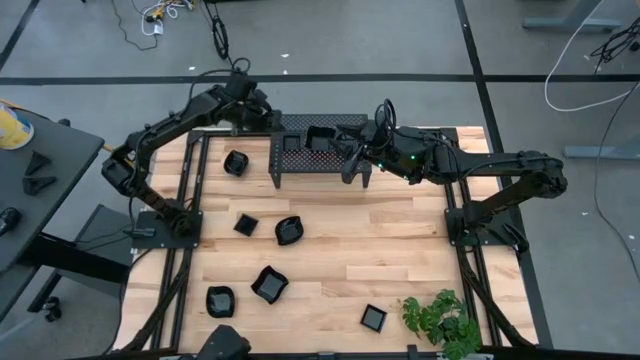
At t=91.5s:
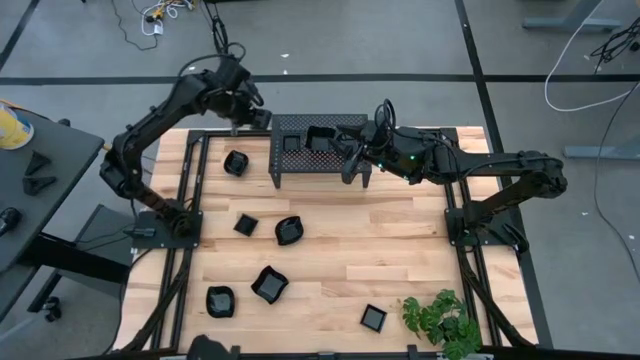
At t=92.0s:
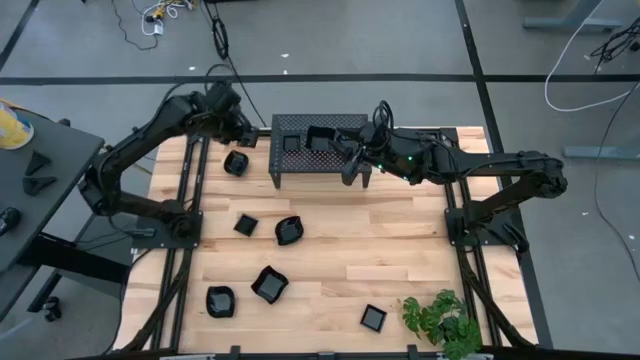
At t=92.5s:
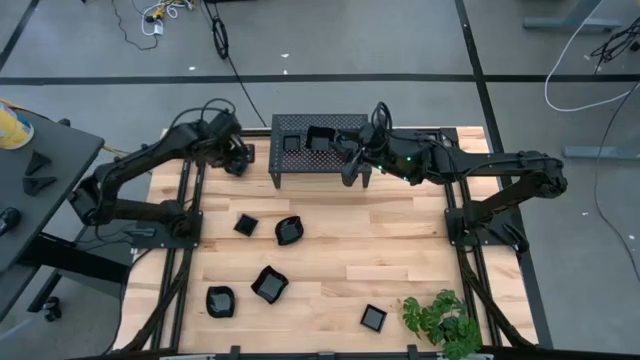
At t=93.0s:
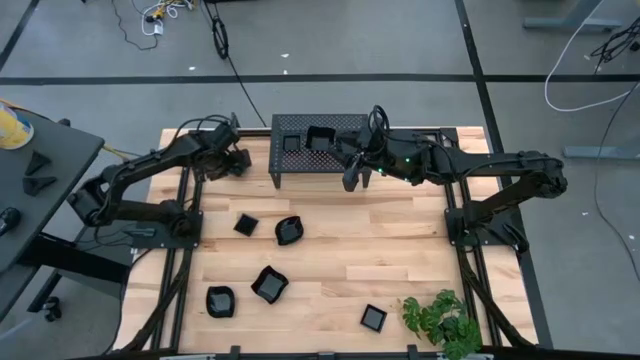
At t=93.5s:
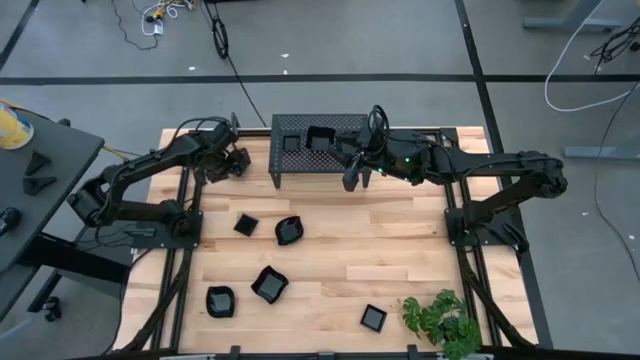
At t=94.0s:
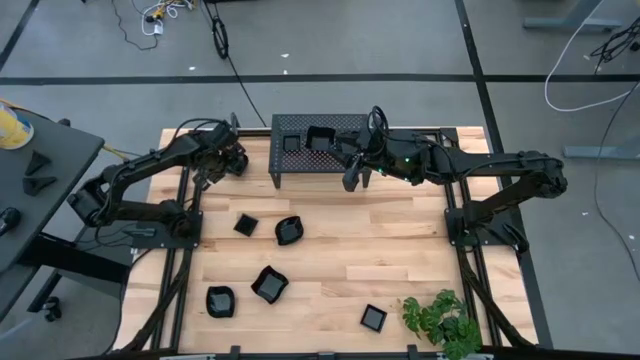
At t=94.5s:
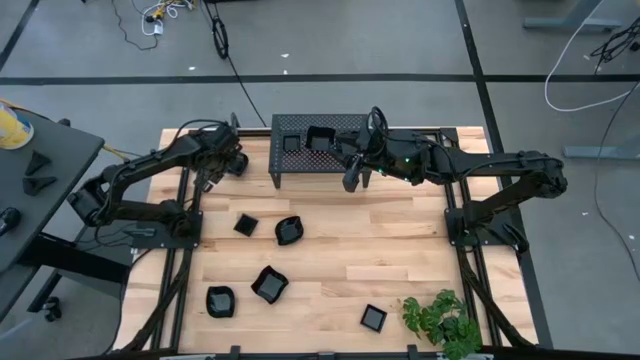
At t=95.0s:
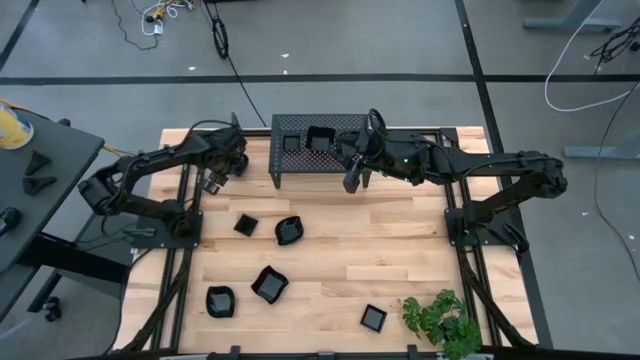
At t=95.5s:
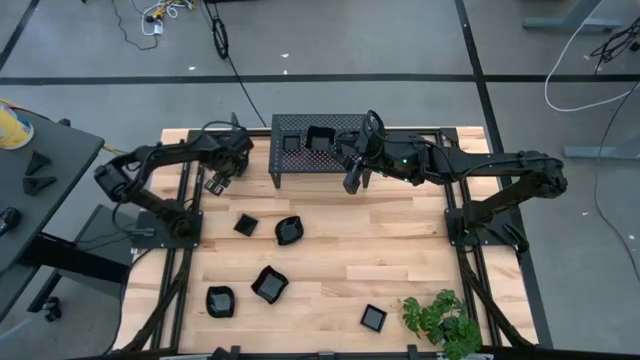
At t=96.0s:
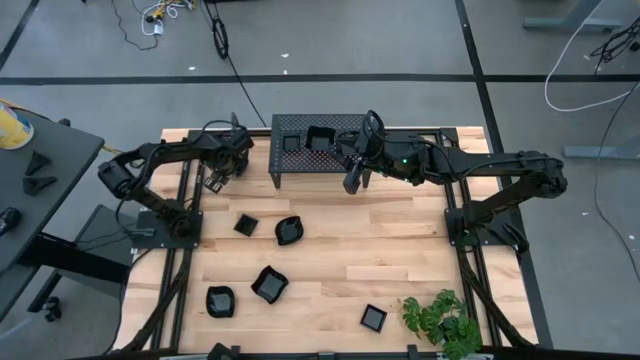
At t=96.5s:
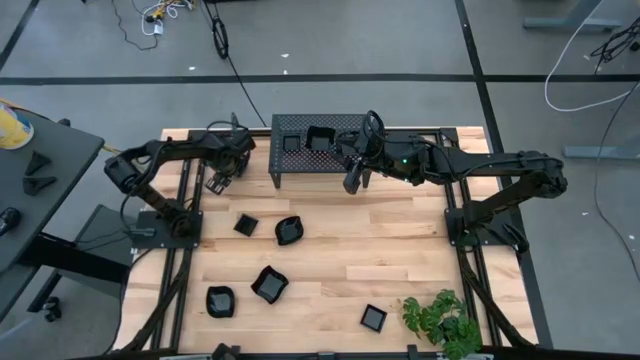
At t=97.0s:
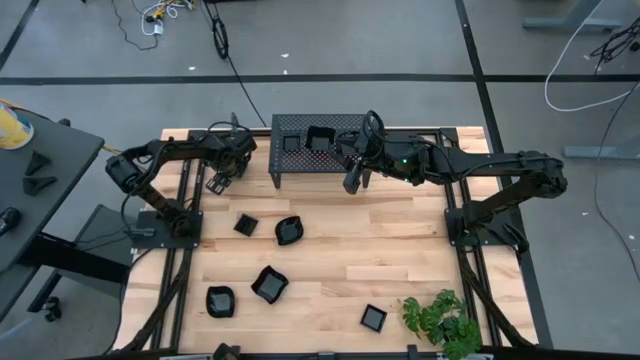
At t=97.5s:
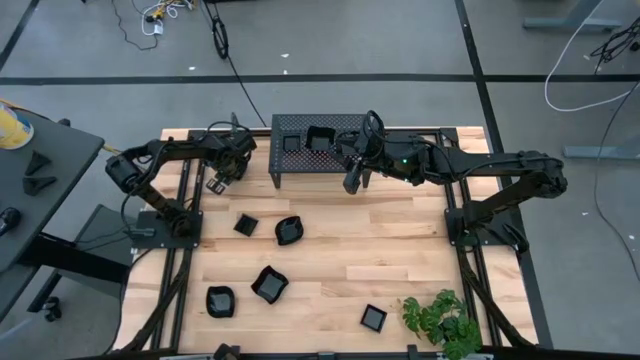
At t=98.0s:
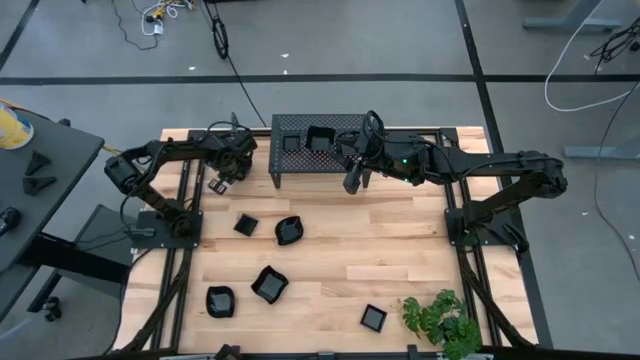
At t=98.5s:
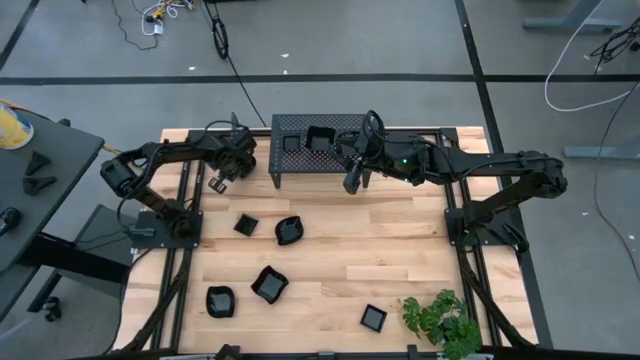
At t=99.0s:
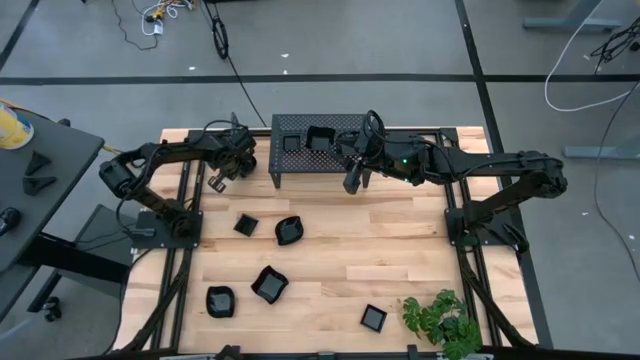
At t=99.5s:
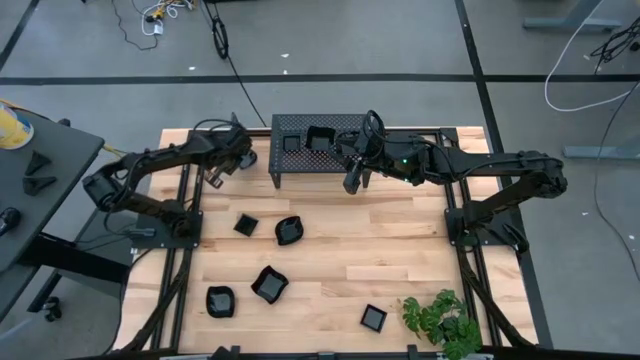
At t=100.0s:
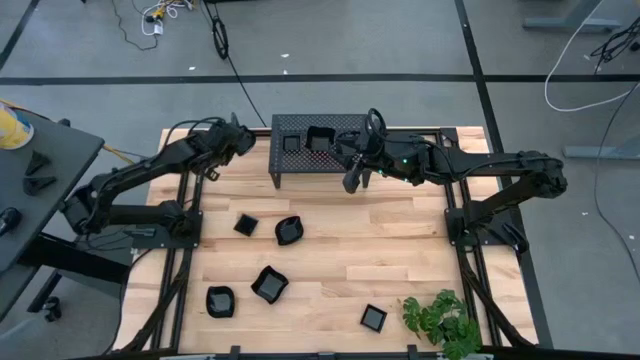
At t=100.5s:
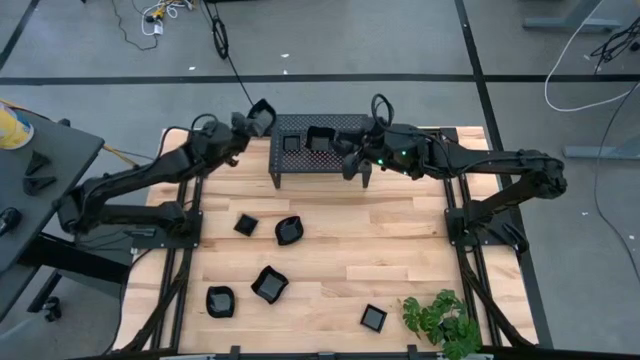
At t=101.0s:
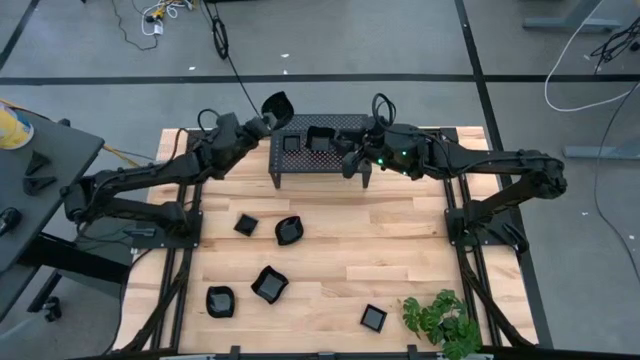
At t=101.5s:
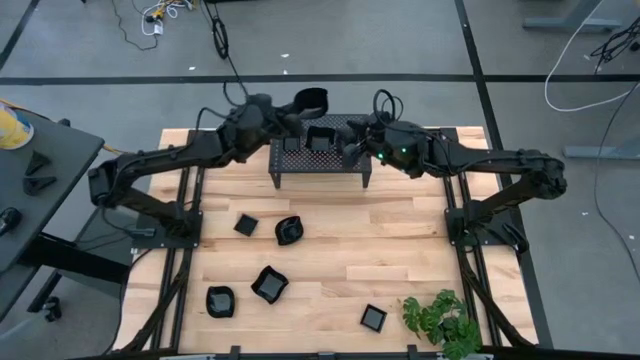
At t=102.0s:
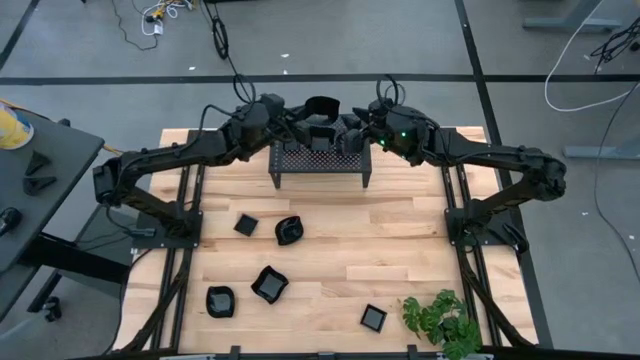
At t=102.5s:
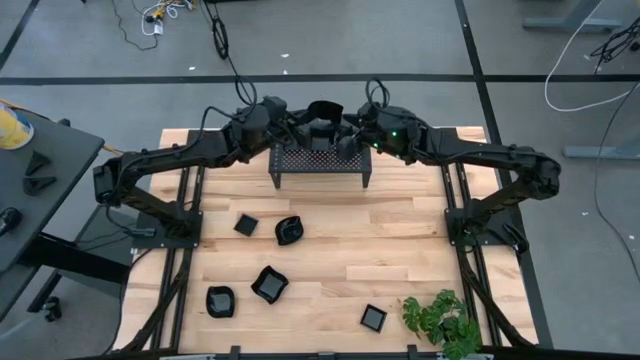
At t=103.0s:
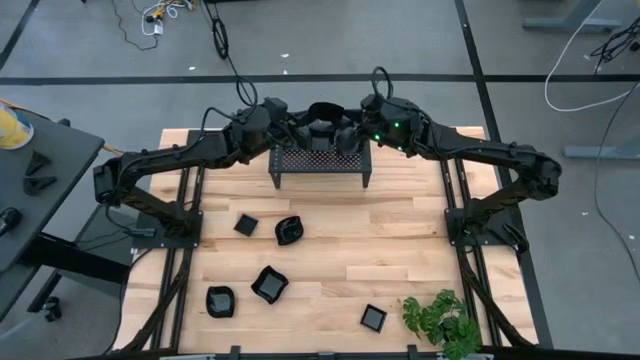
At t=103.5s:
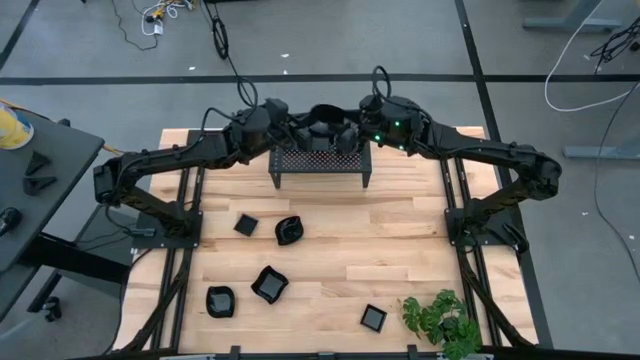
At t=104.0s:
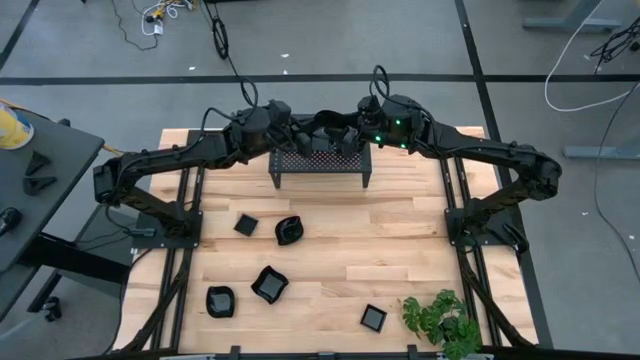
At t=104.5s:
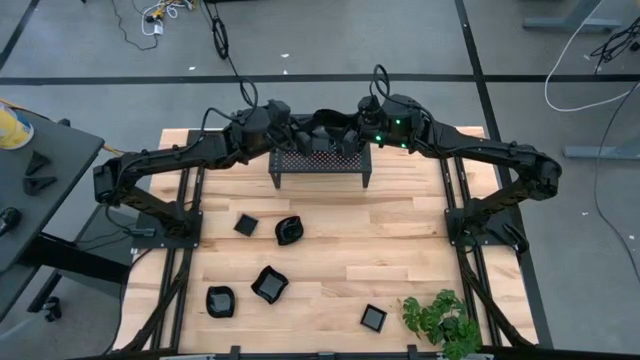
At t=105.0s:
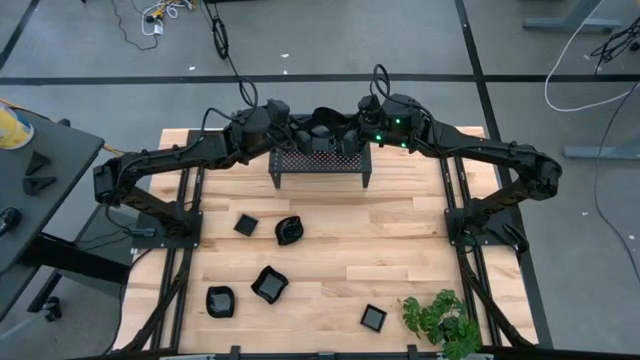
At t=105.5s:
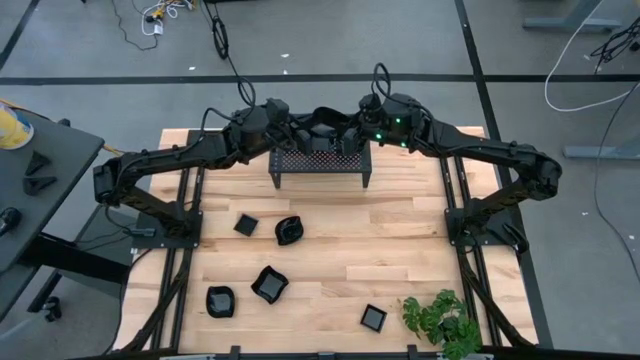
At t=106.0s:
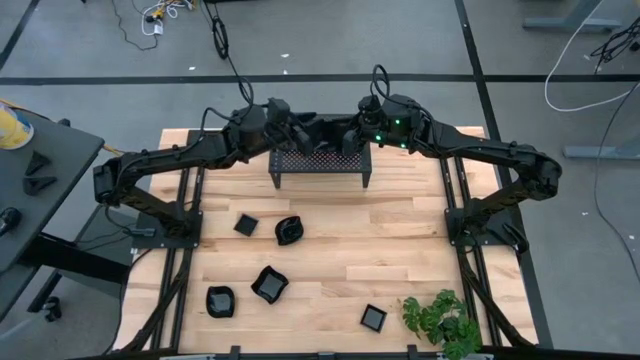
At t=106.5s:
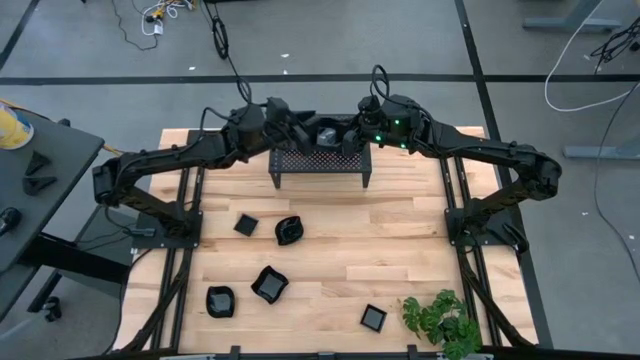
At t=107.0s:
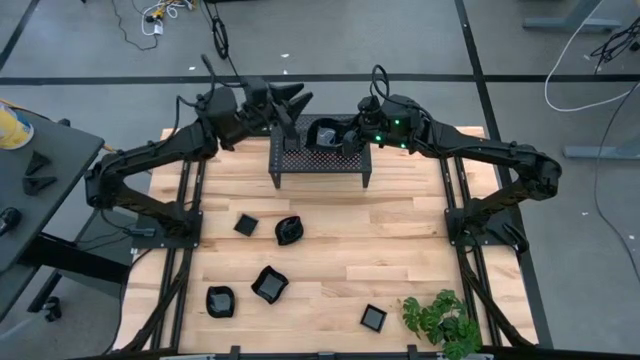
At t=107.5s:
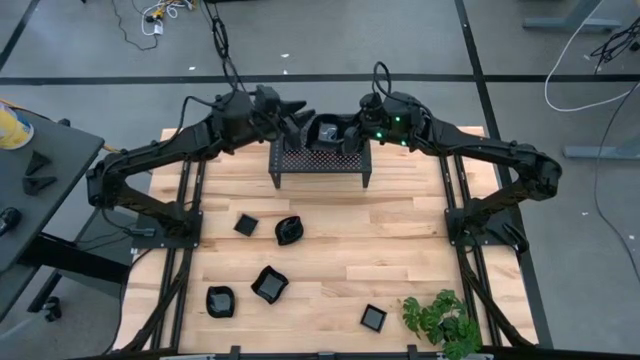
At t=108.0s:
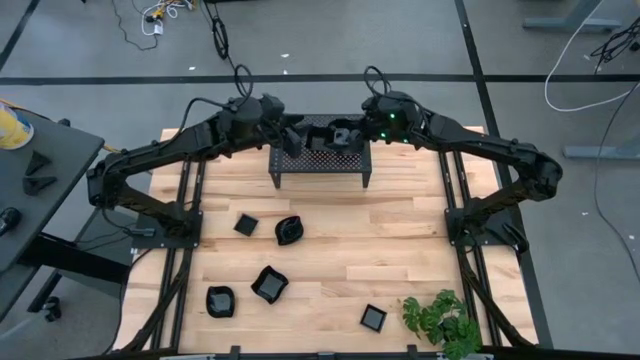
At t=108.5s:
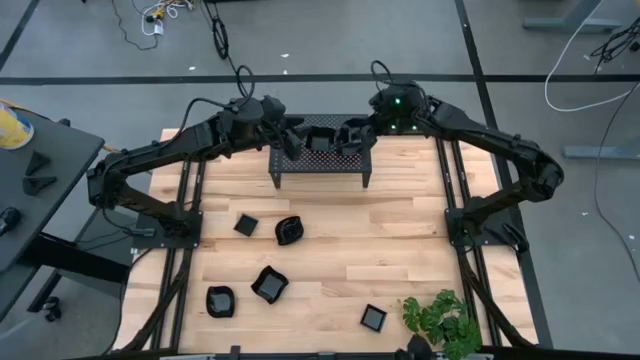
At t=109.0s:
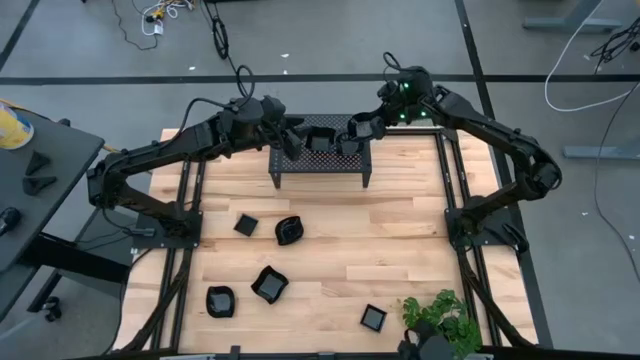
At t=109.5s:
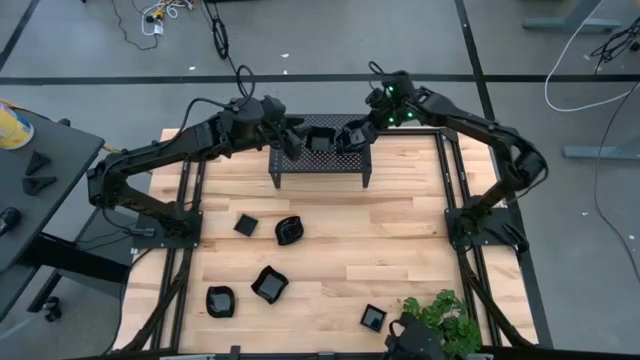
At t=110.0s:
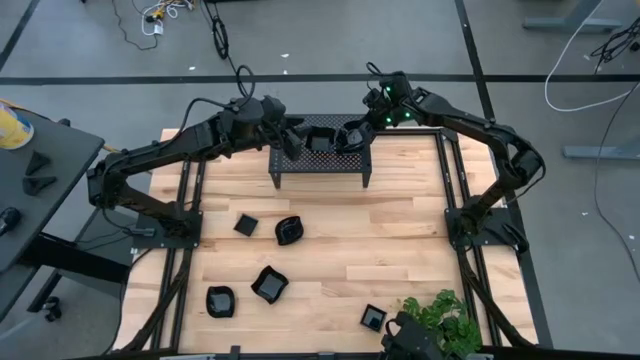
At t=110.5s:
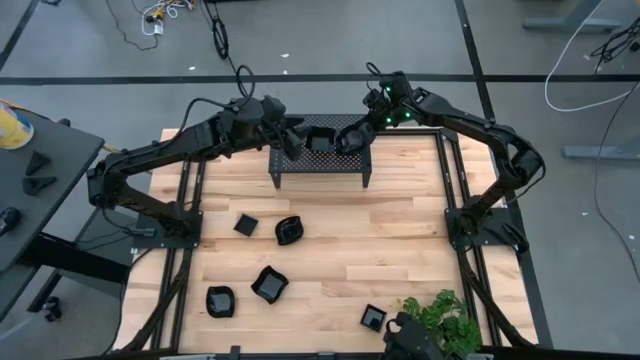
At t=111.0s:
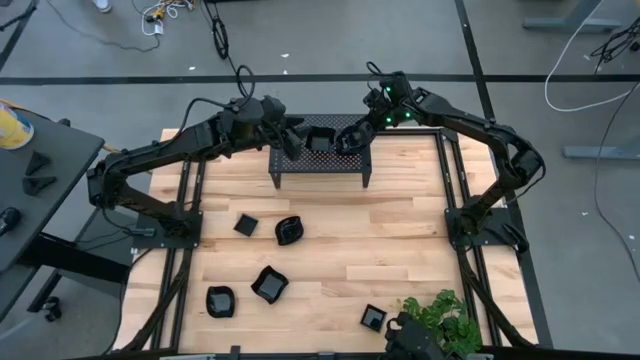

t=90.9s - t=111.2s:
Task: Pick & Place Mini shaped plates
Stack the leaf shaped plate on top of the other leaf shaped plate on the shelf

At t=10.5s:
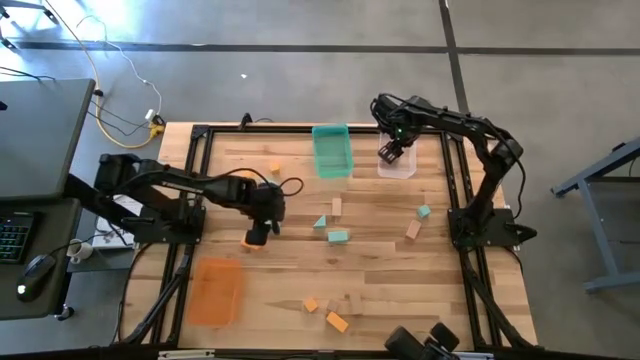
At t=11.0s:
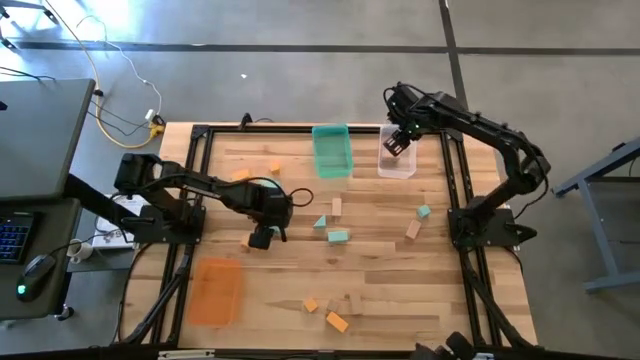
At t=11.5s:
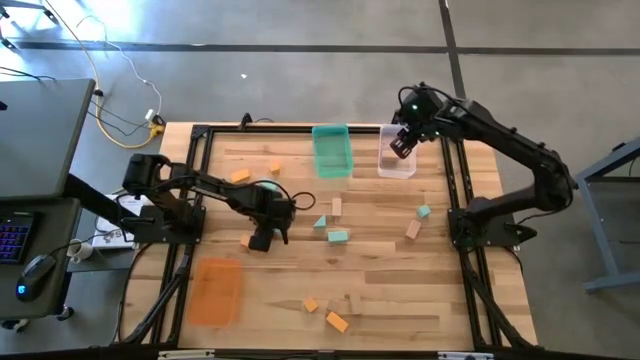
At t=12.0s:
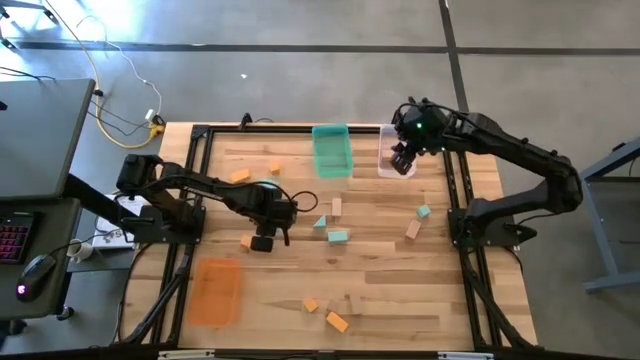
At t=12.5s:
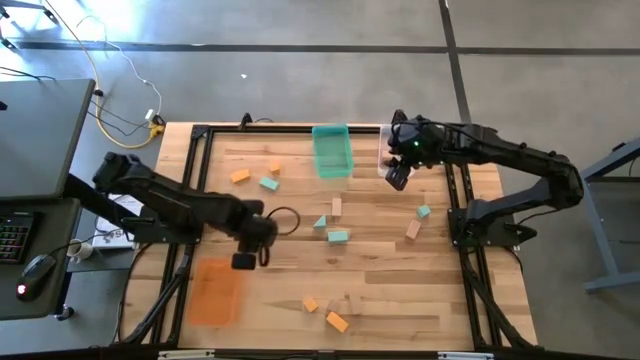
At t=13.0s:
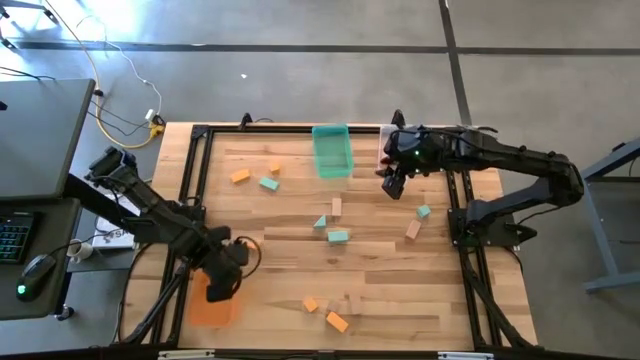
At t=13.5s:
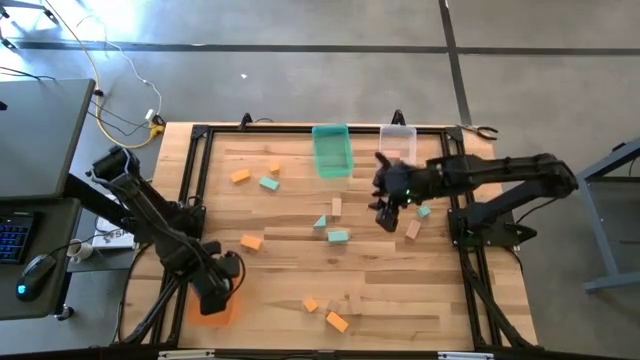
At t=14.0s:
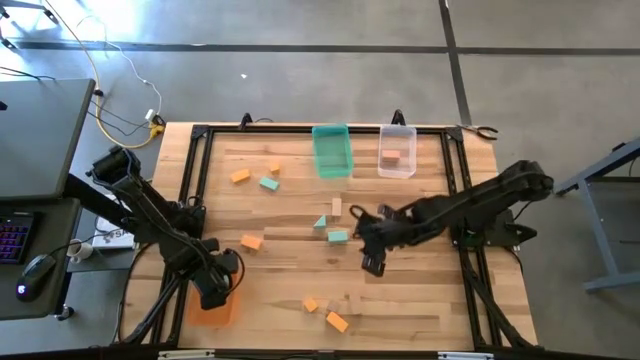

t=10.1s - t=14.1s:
Task: Sort & place blocks by color
Put the light blue block into the orange bin
